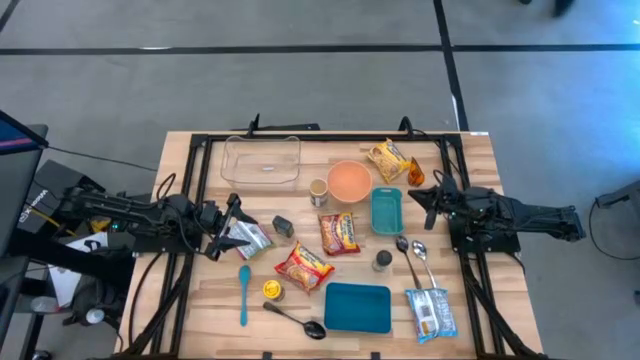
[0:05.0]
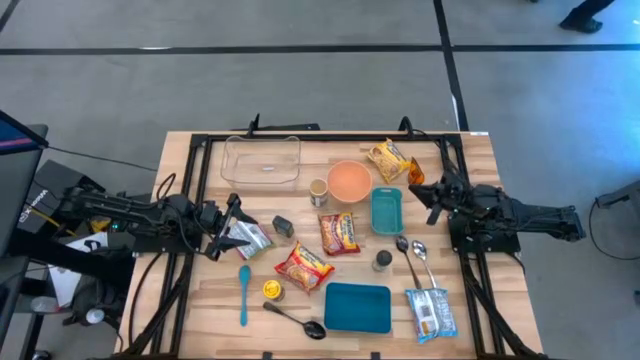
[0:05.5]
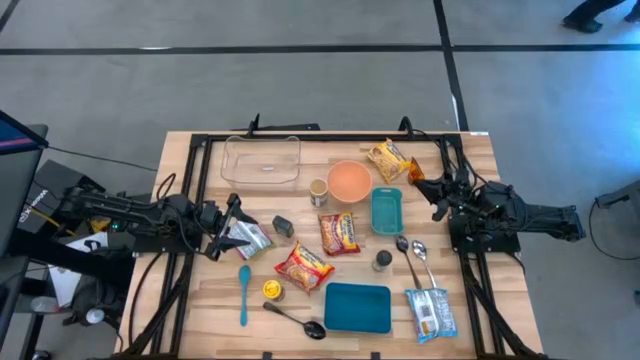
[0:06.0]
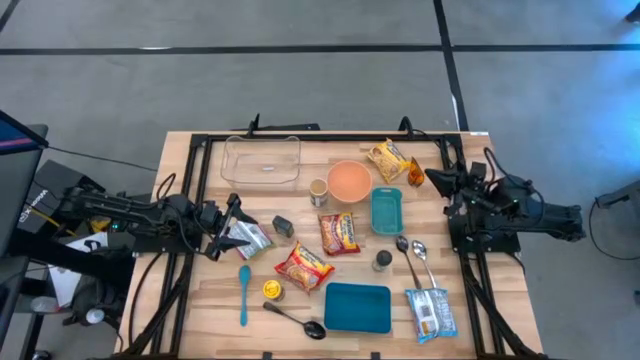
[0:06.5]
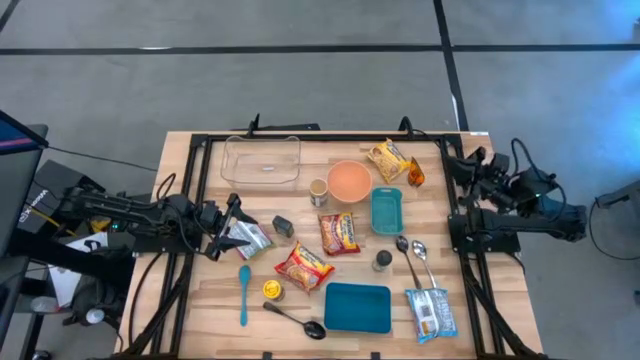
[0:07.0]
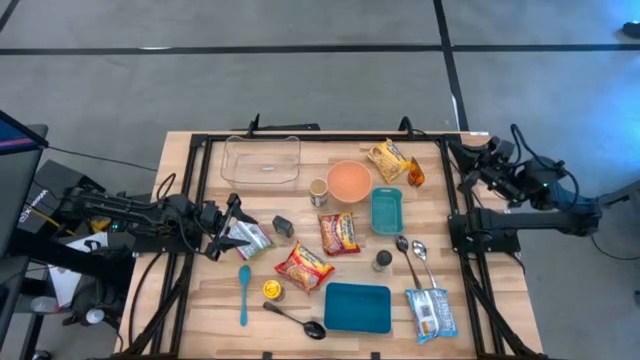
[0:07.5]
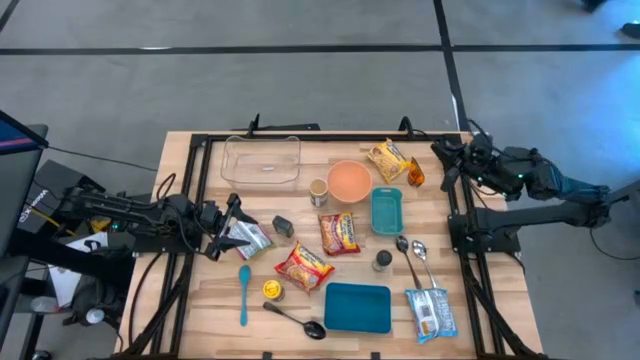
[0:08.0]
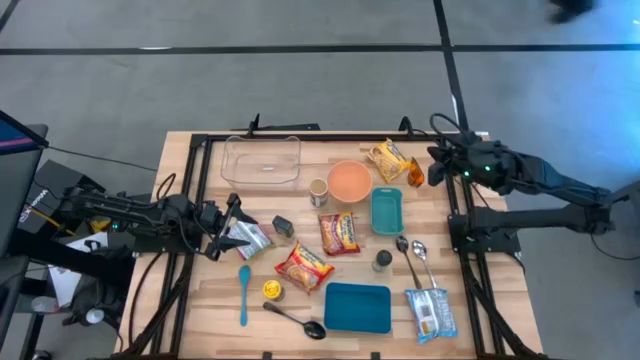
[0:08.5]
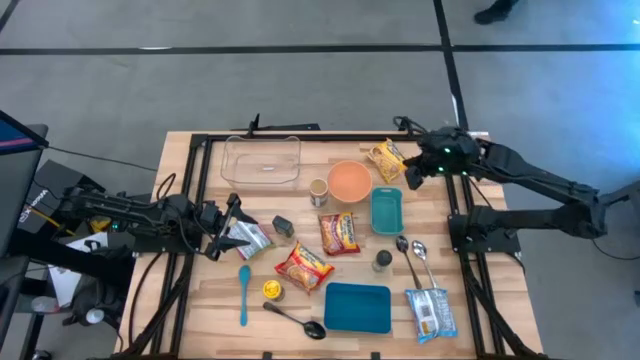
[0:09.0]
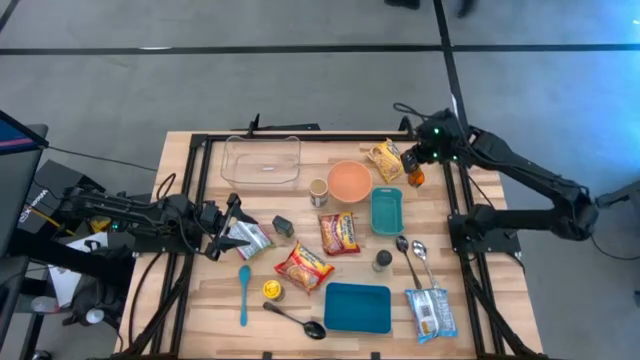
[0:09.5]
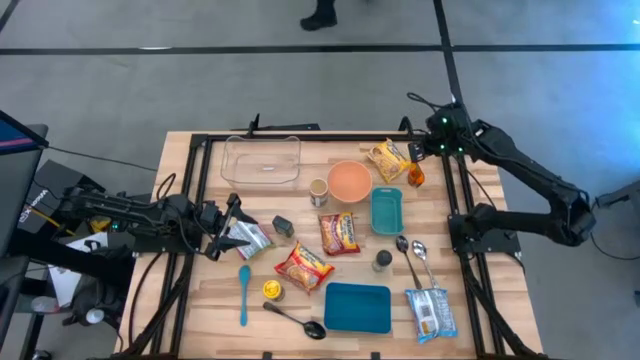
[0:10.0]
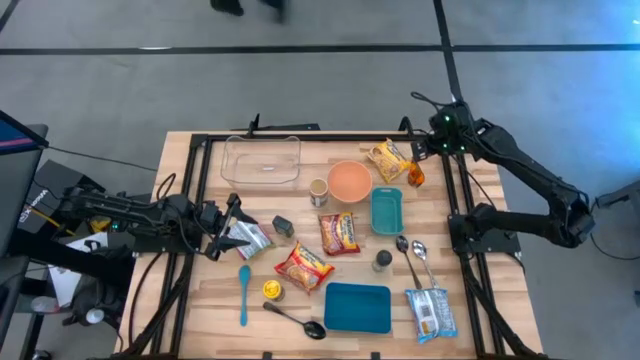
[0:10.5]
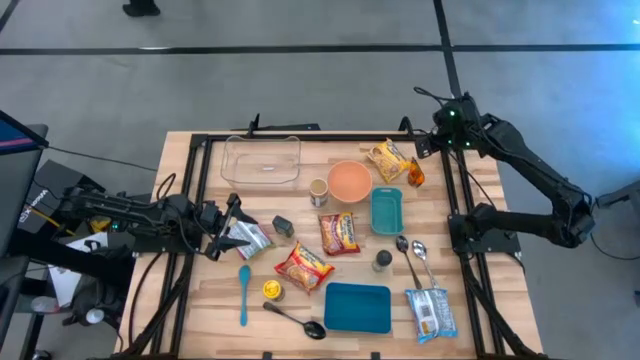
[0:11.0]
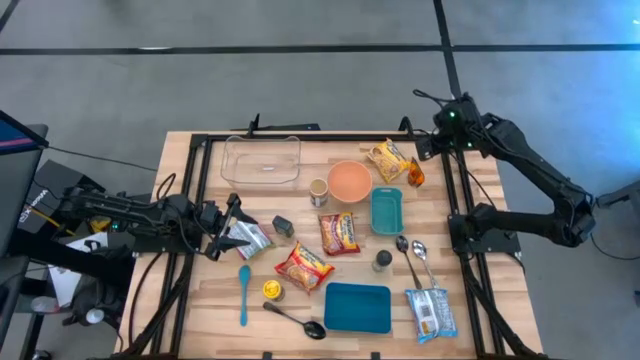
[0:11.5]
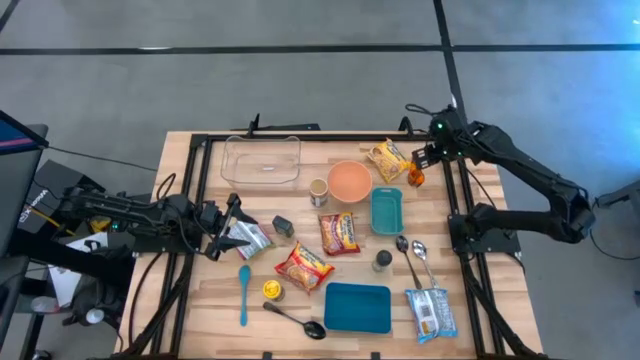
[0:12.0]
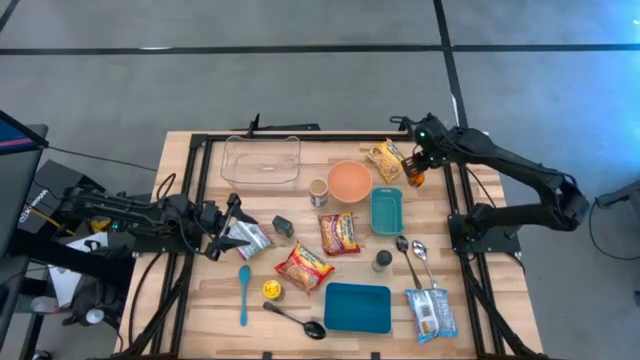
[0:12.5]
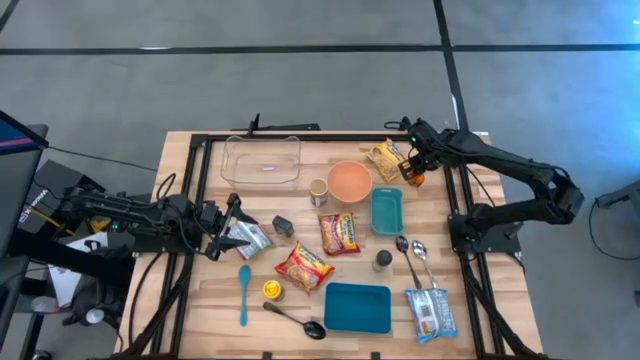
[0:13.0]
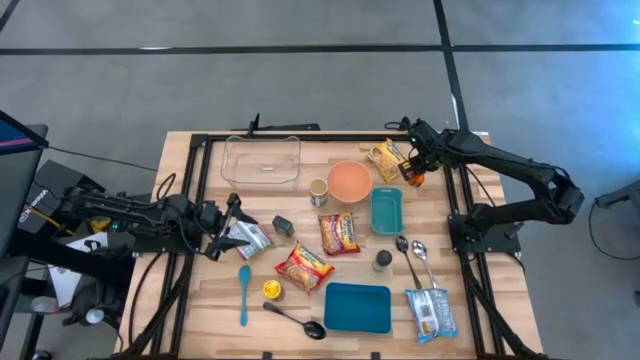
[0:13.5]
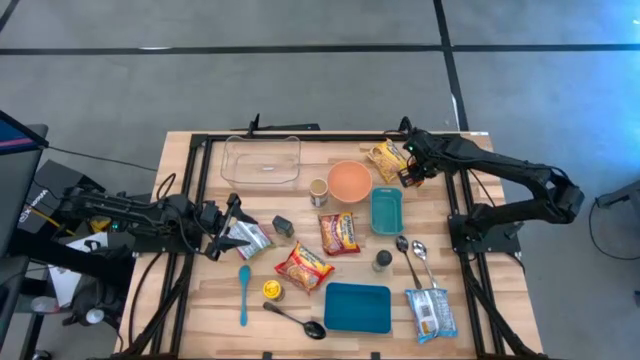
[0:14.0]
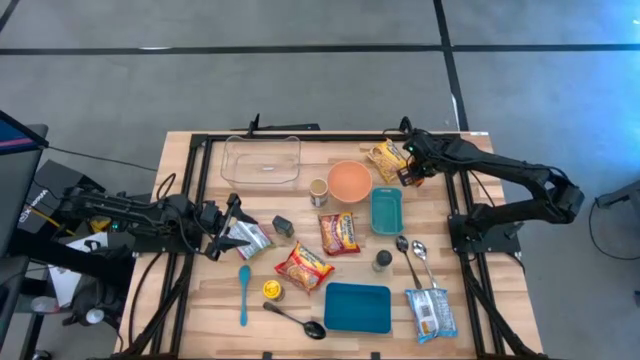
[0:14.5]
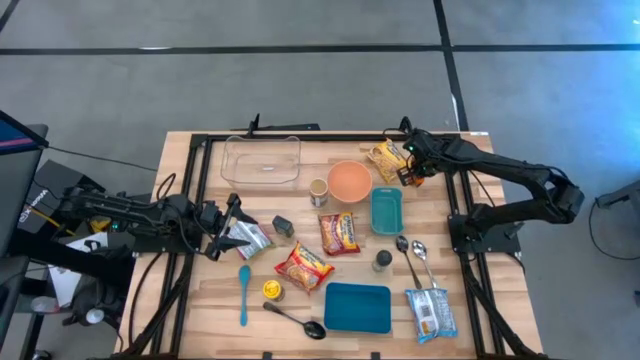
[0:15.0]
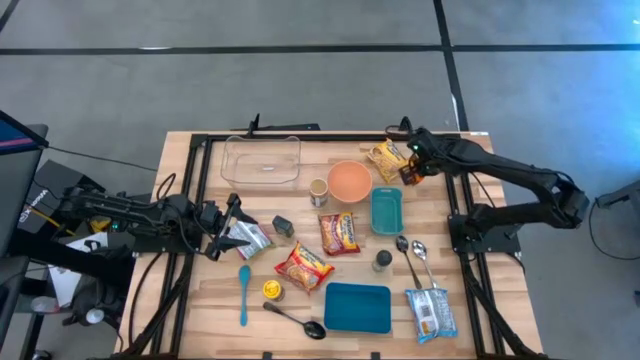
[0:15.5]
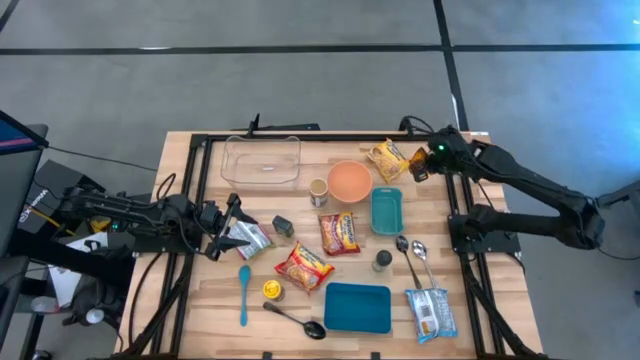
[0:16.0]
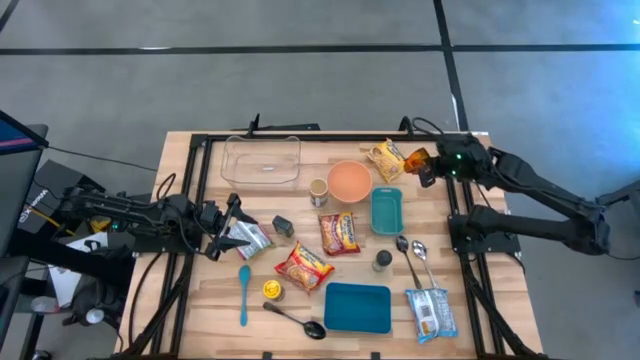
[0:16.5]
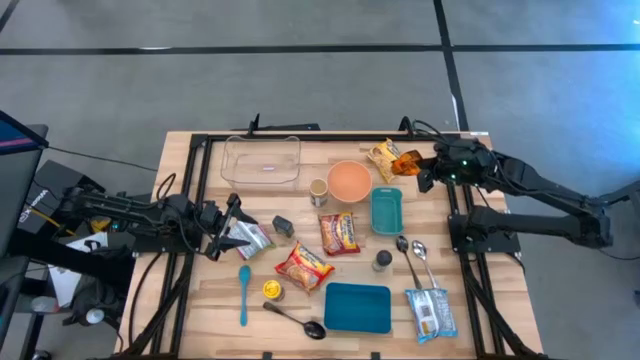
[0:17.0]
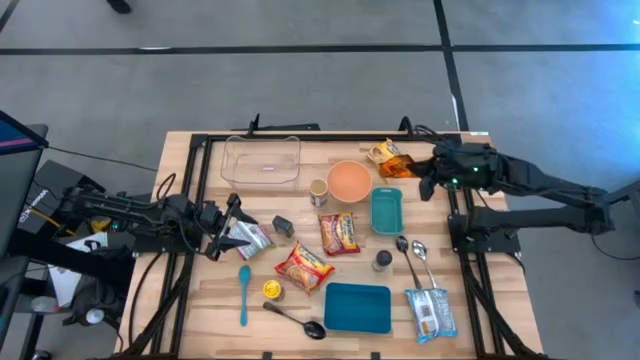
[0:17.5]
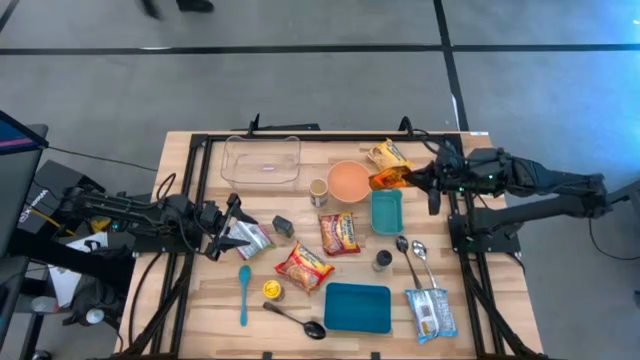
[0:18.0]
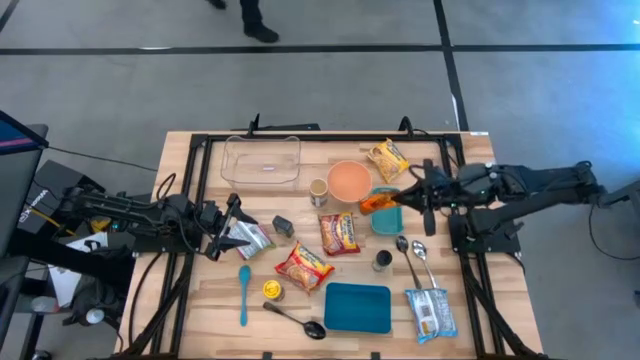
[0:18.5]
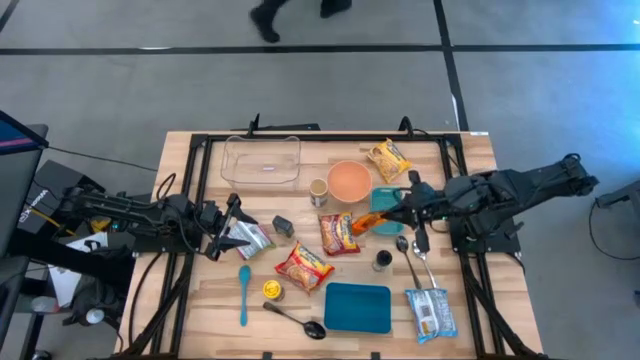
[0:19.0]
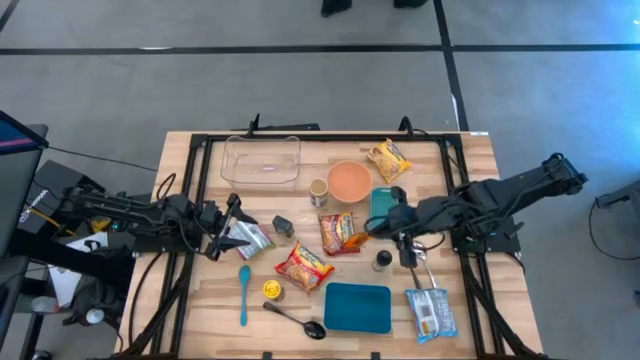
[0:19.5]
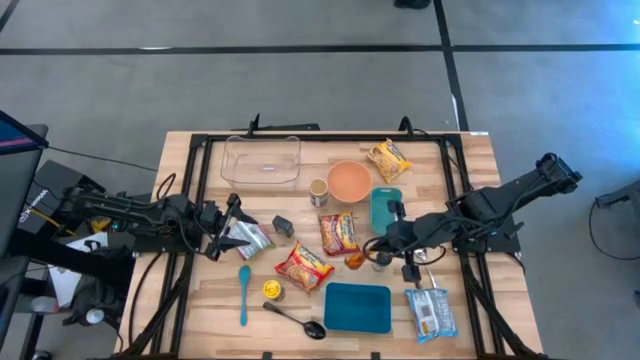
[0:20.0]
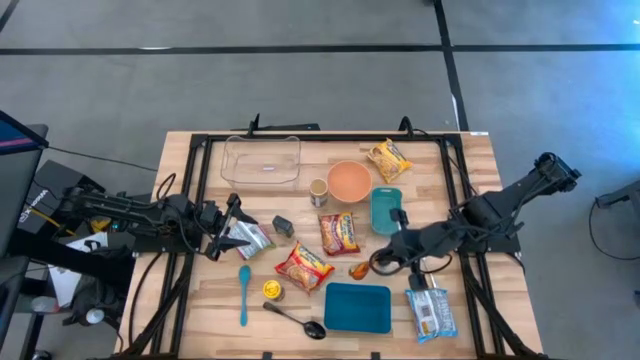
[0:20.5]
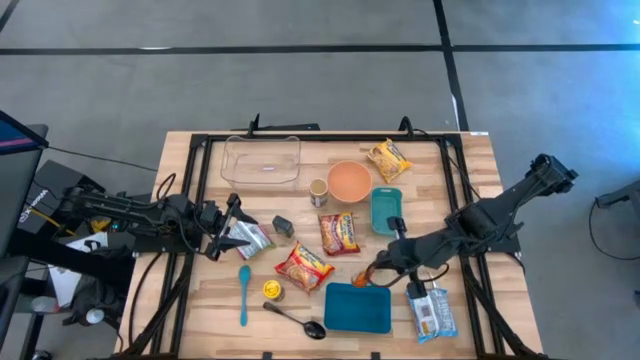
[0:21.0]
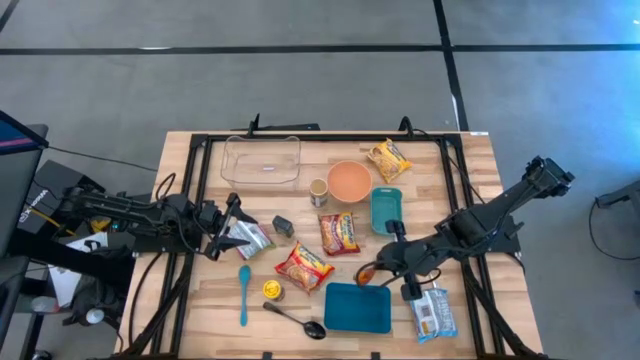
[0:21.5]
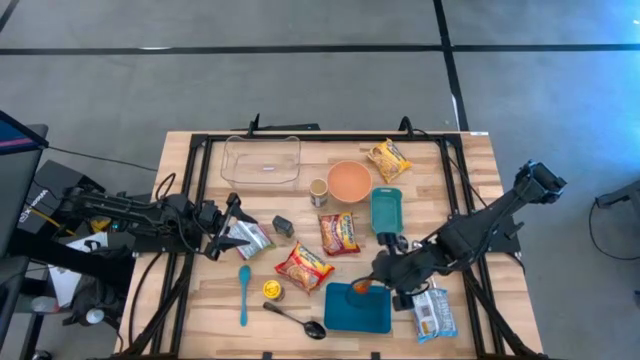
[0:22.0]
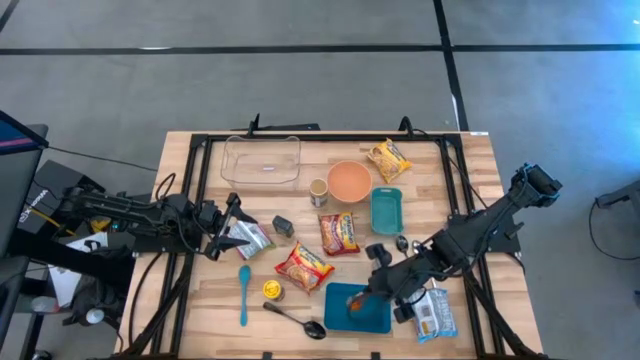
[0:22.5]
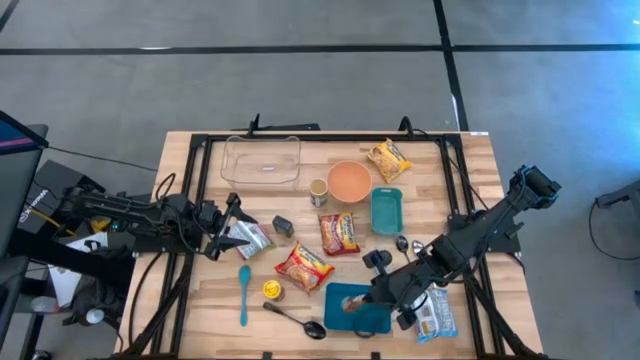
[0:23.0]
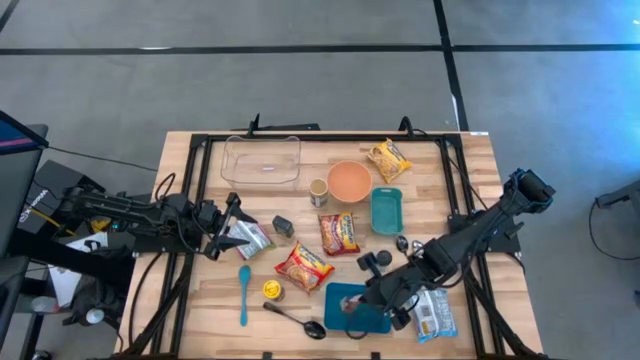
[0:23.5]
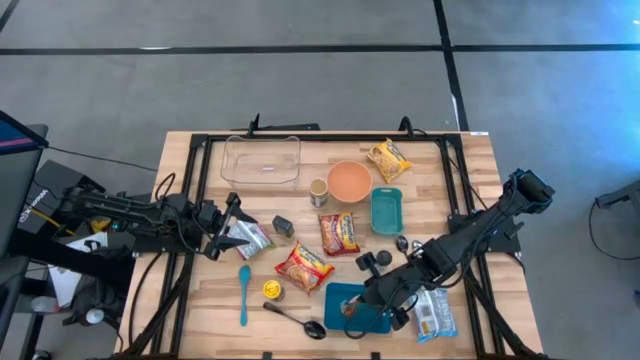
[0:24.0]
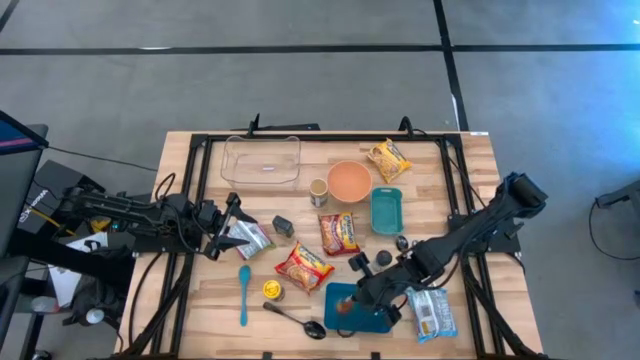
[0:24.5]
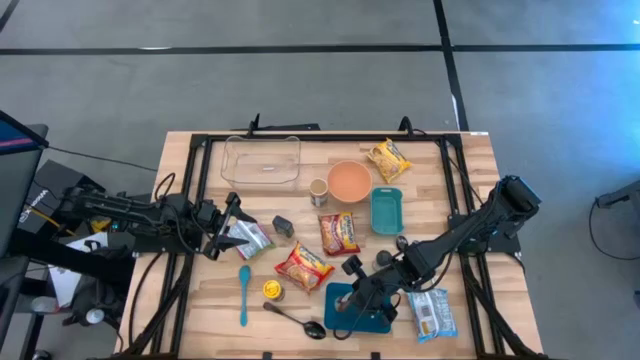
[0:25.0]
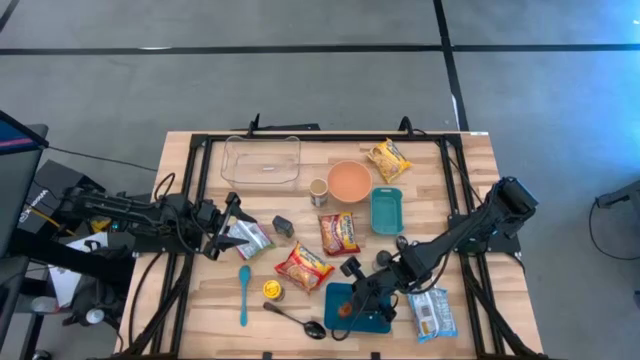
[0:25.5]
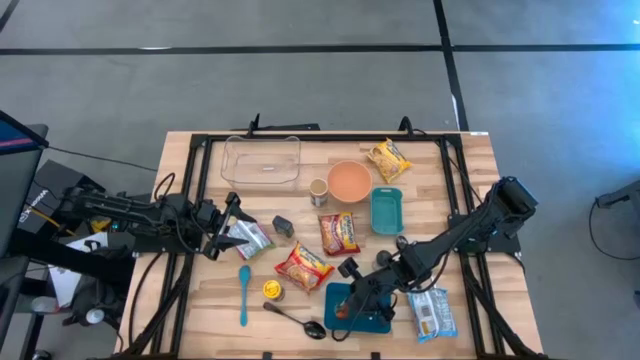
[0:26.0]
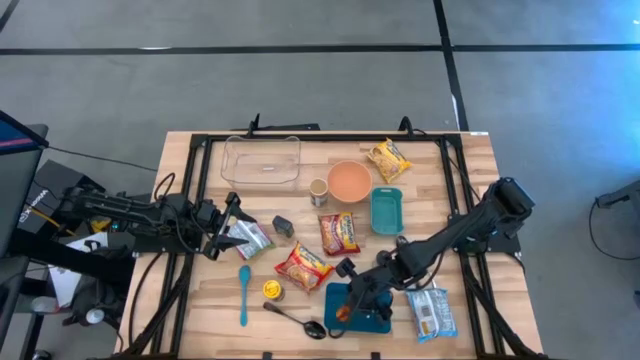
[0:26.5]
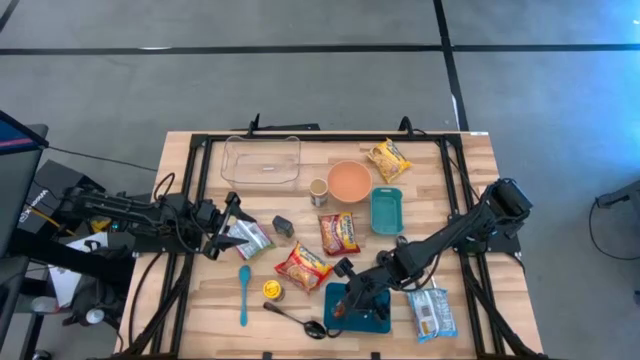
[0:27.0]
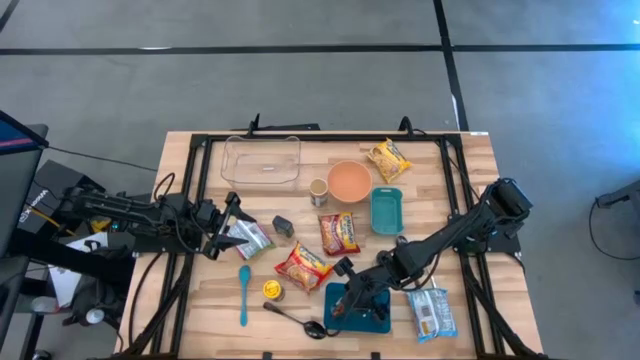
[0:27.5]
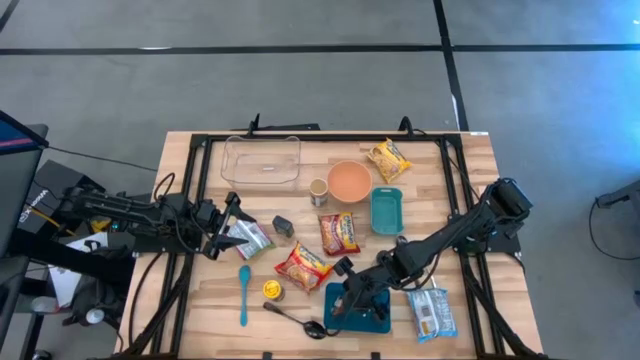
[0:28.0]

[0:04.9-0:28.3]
Task: Pick & Place Food Item
Put the orange seasoning pack into the blue bin
